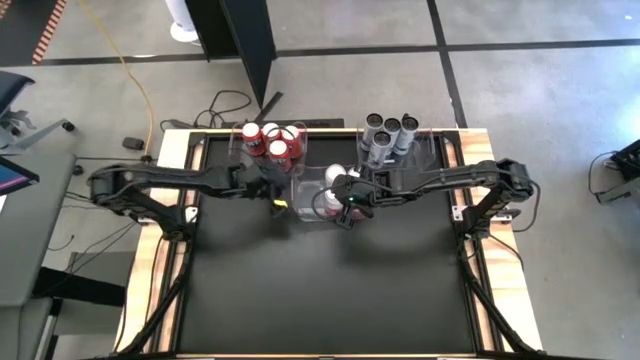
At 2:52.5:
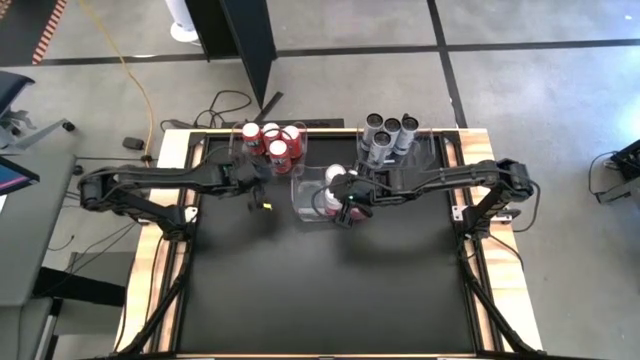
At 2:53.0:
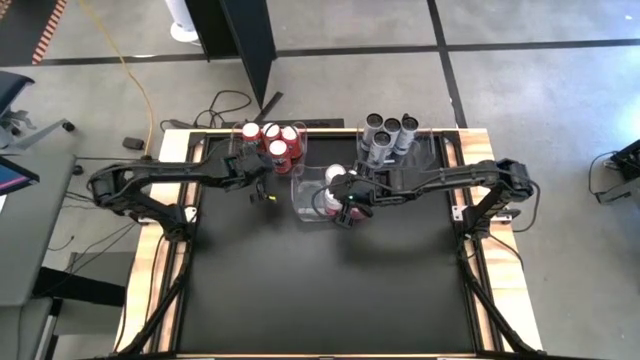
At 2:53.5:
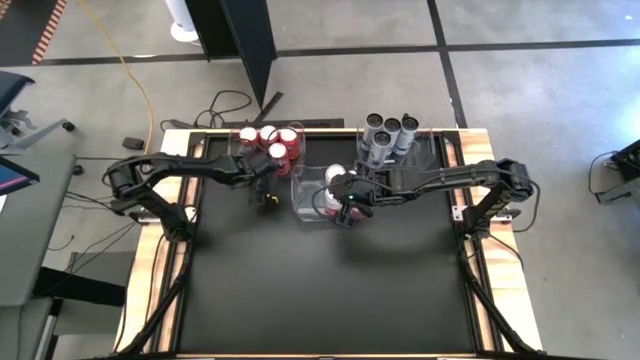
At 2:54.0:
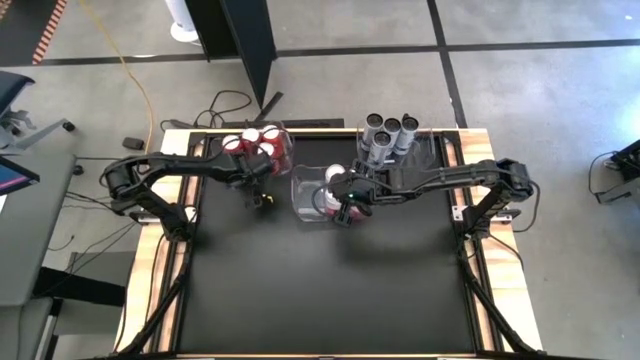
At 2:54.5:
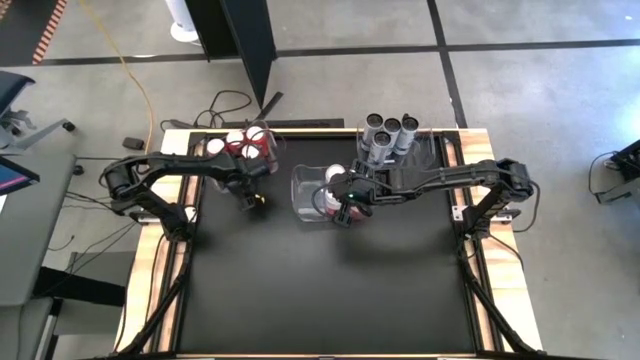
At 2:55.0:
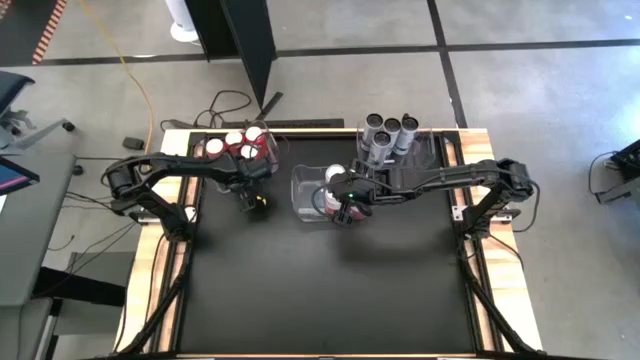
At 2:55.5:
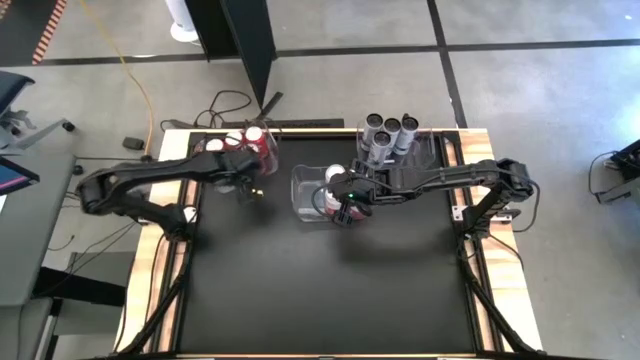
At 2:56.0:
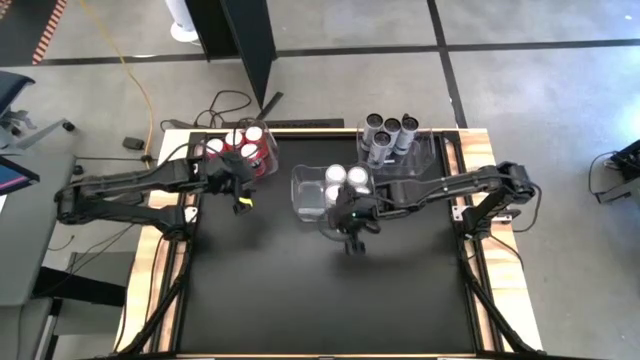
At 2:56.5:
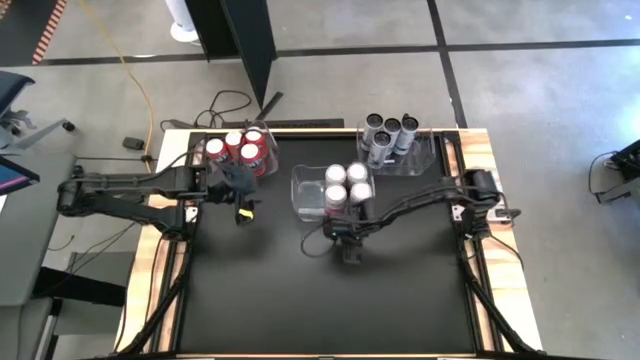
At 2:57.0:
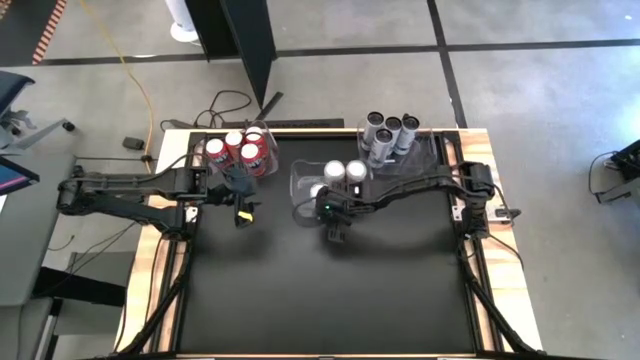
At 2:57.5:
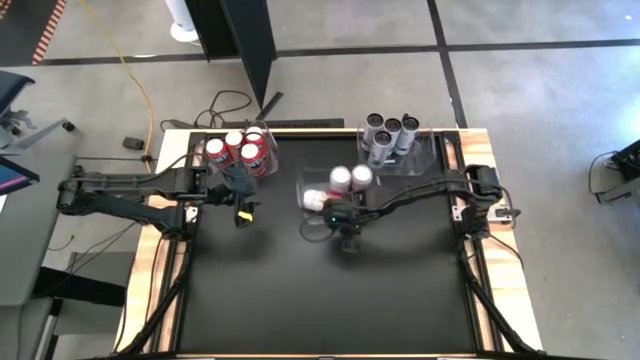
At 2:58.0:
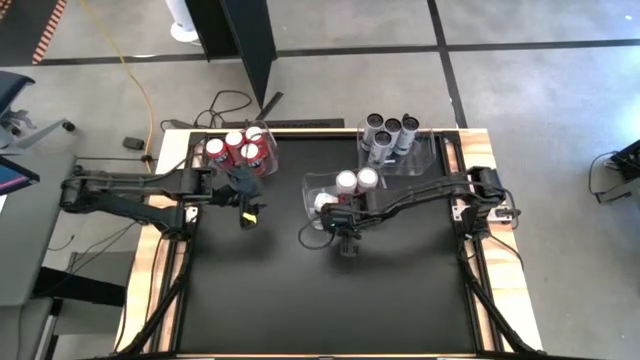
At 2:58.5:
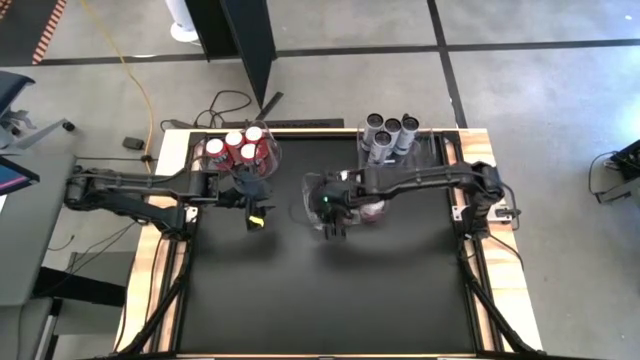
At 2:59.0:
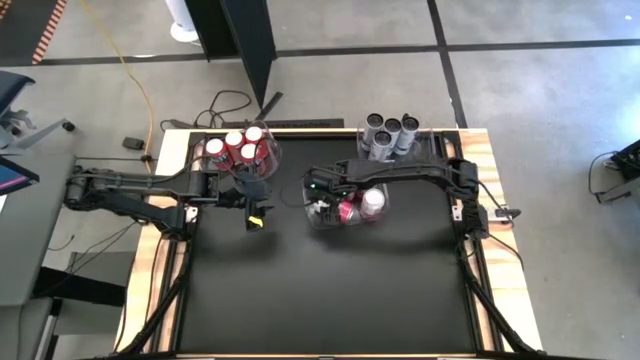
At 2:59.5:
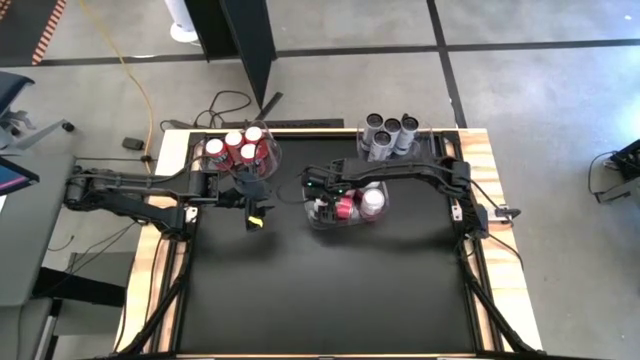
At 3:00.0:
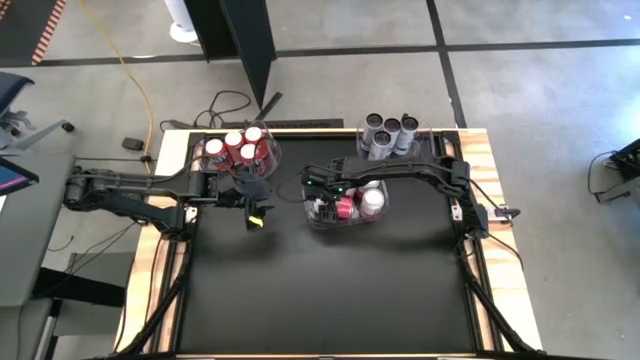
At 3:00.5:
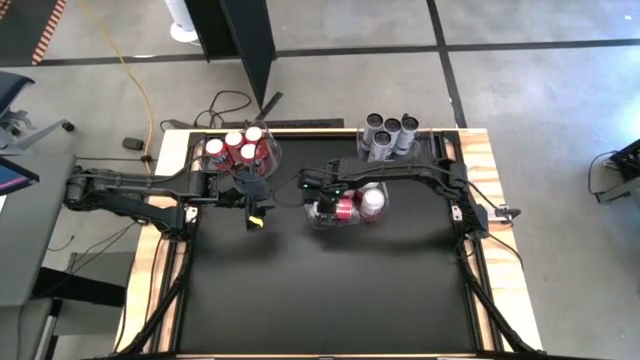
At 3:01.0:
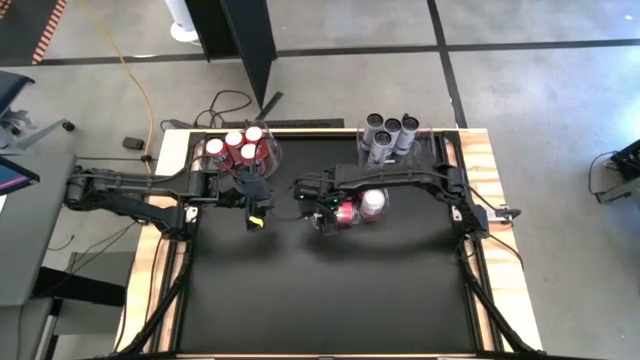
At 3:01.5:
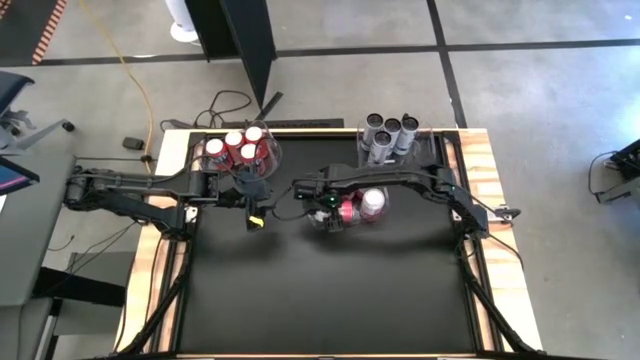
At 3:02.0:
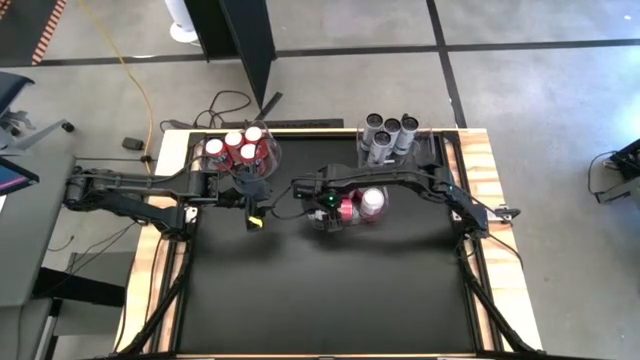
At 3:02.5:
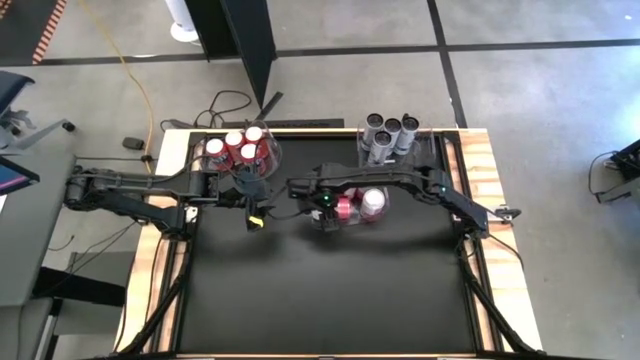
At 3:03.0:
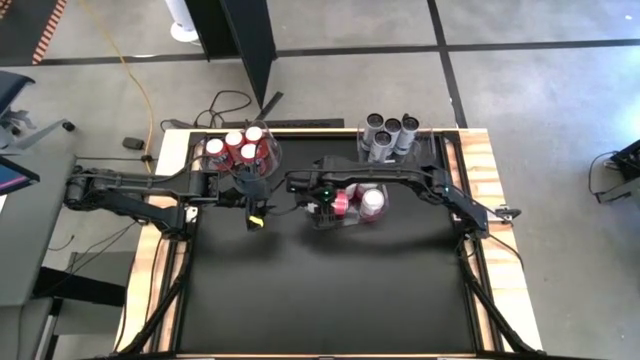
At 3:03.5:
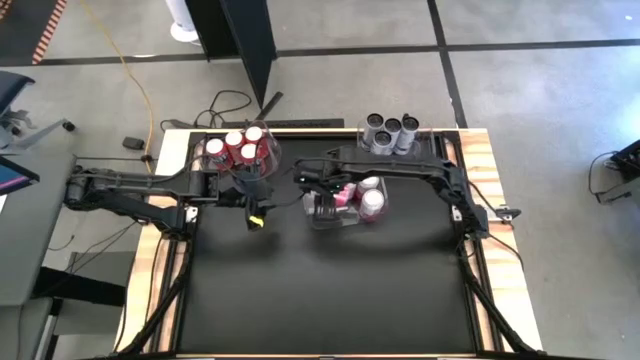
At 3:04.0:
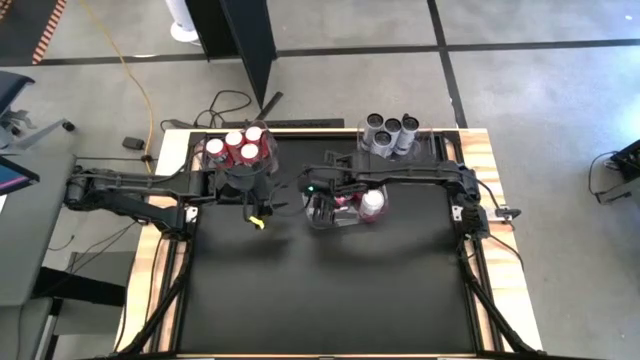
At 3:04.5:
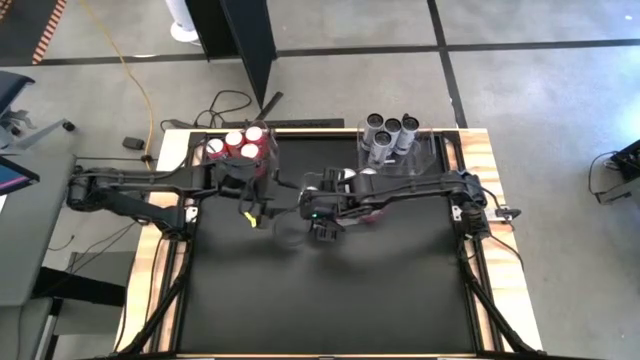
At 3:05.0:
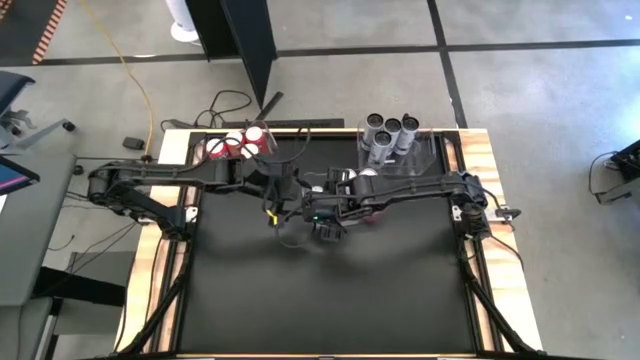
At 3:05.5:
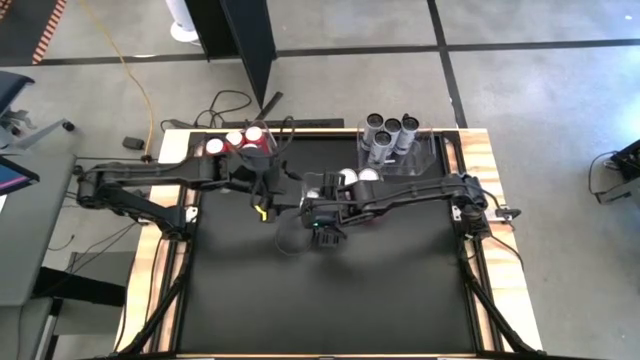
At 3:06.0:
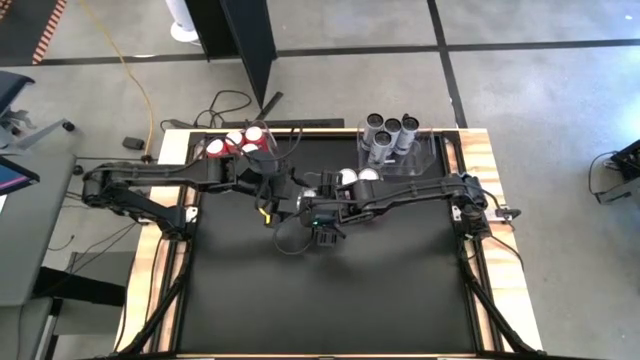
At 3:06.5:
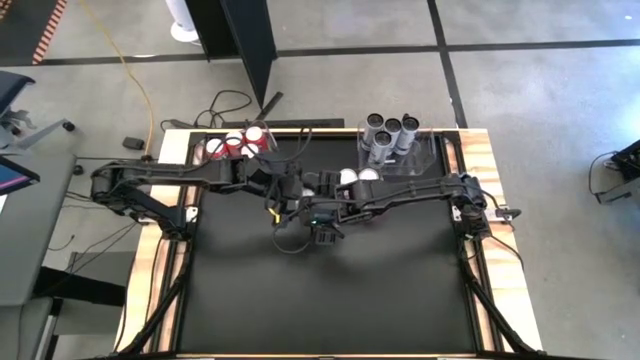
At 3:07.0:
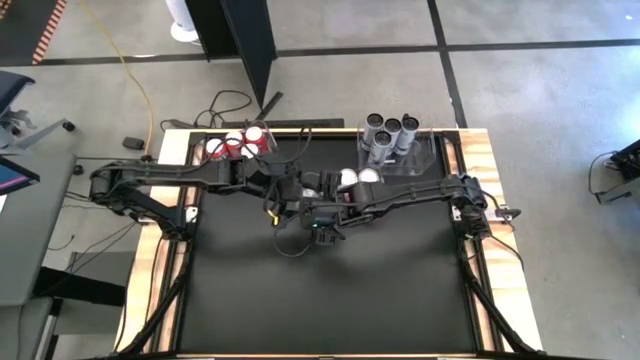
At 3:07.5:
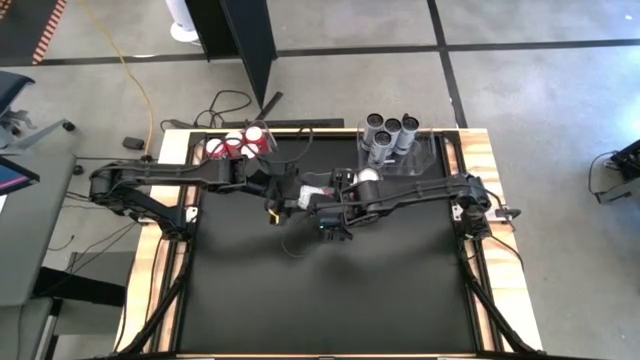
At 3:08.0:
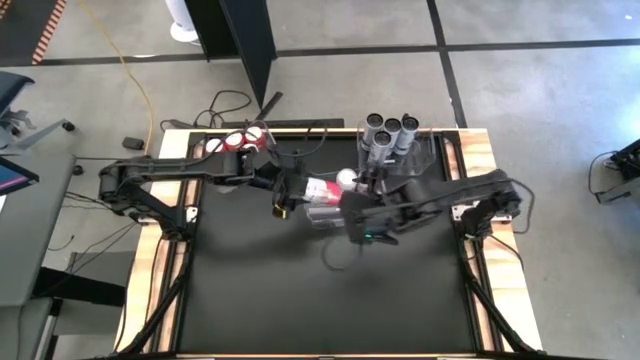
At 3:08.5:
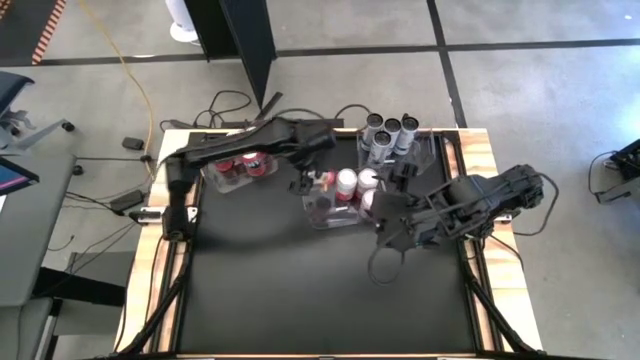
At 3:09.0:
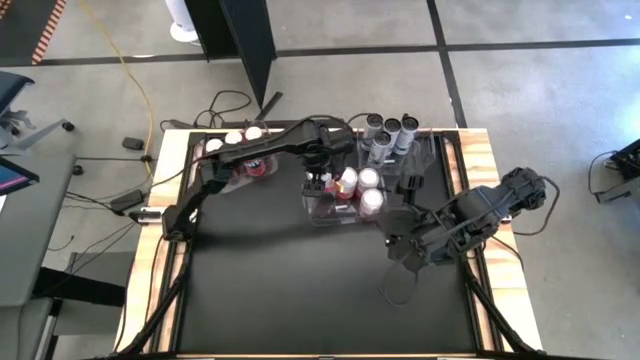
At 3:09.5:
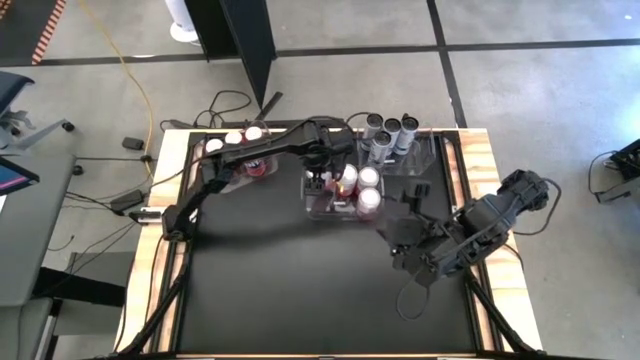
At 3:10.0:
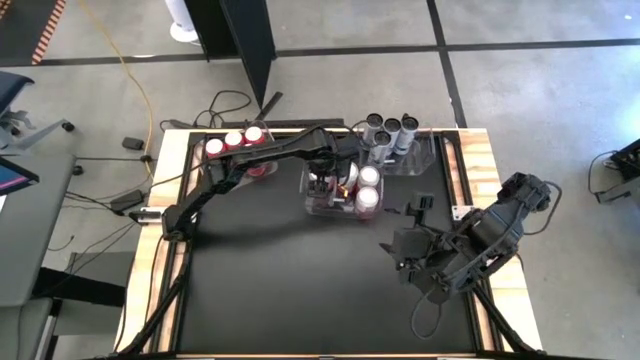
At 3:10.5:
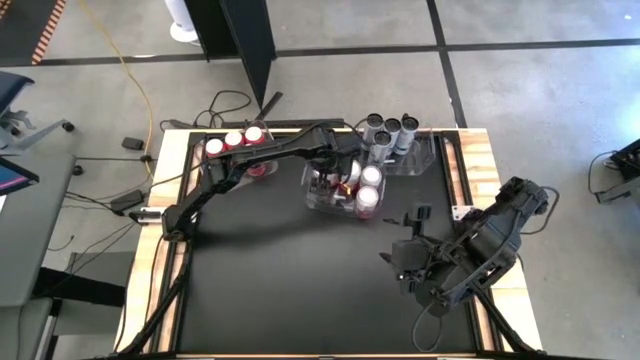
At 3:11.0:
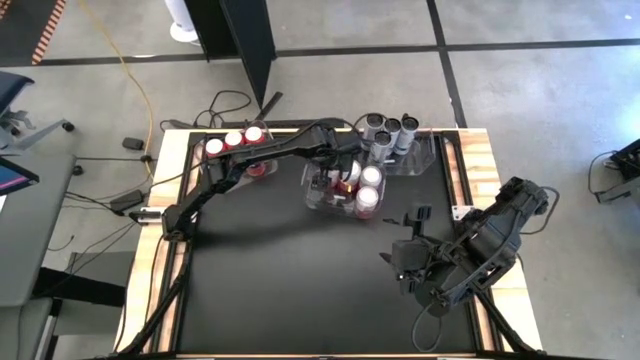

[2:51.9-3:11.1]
Task: Sort soda cans
Adjust the pink-white soda can
